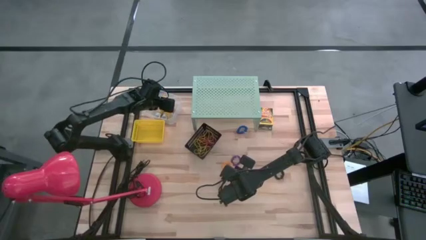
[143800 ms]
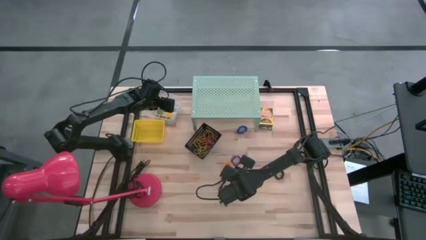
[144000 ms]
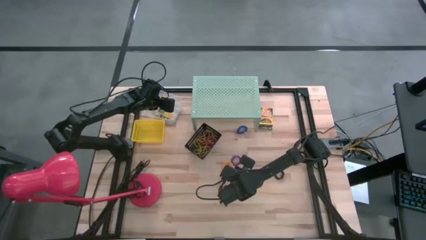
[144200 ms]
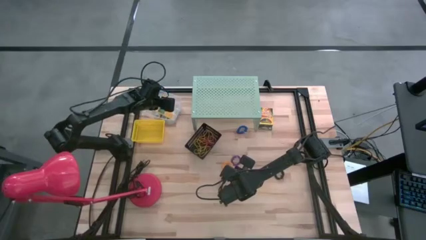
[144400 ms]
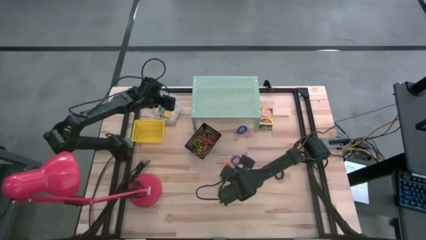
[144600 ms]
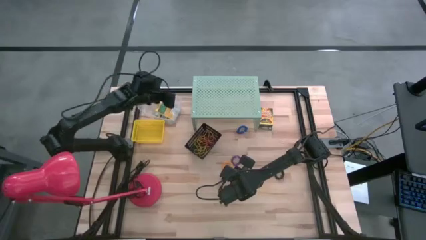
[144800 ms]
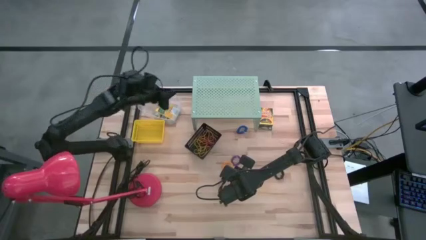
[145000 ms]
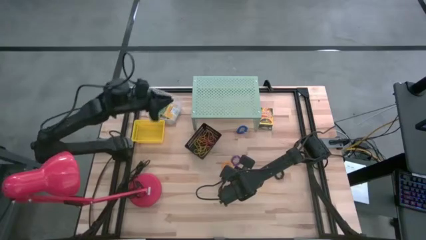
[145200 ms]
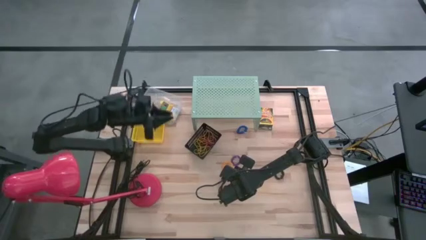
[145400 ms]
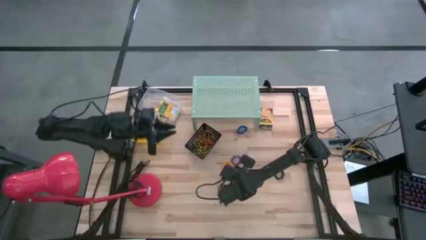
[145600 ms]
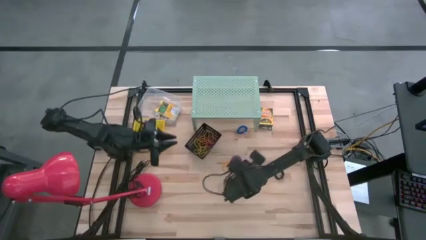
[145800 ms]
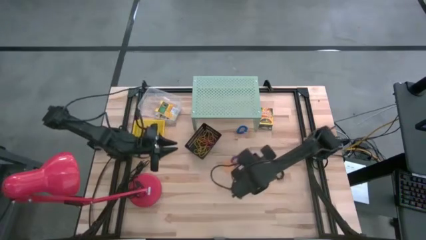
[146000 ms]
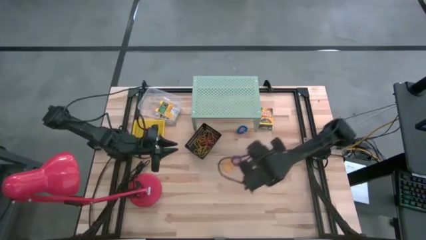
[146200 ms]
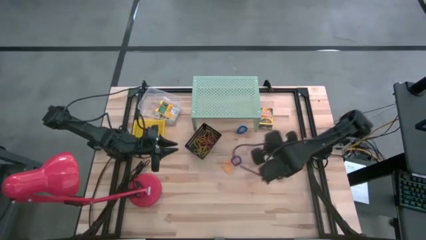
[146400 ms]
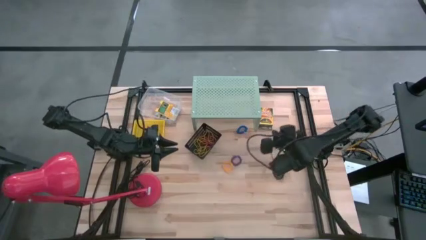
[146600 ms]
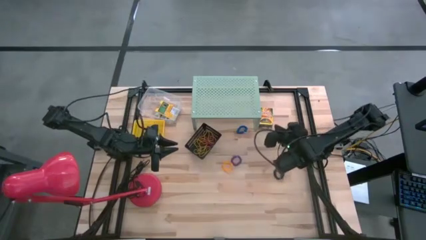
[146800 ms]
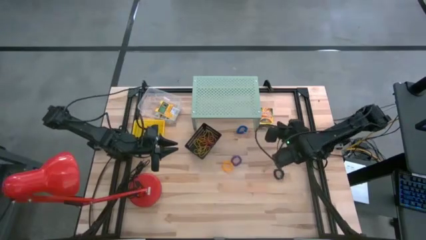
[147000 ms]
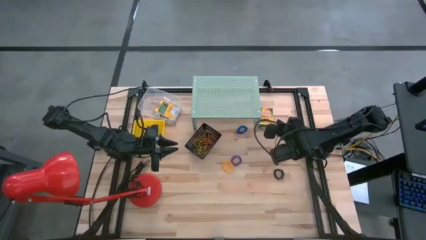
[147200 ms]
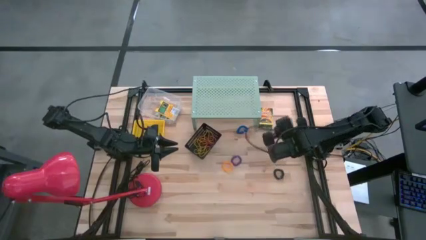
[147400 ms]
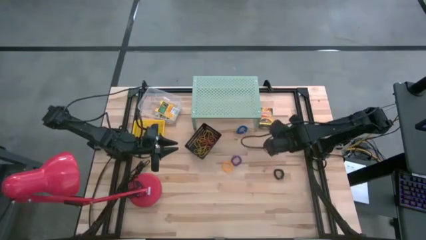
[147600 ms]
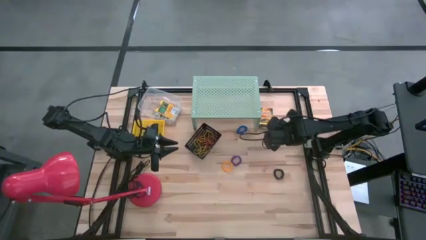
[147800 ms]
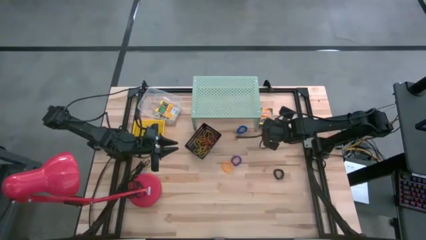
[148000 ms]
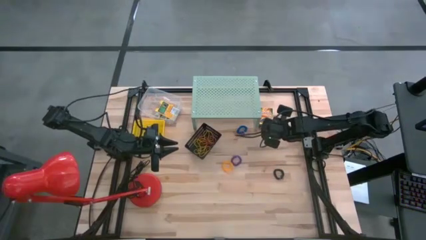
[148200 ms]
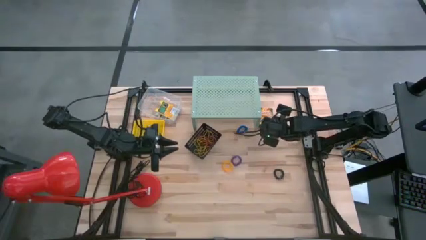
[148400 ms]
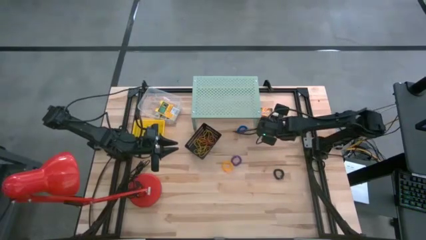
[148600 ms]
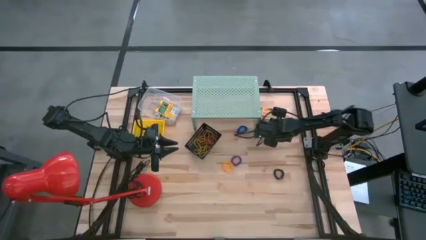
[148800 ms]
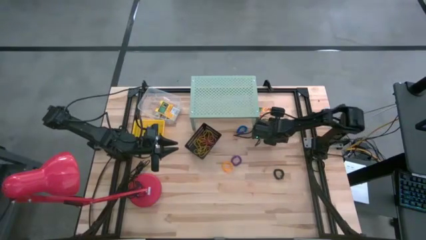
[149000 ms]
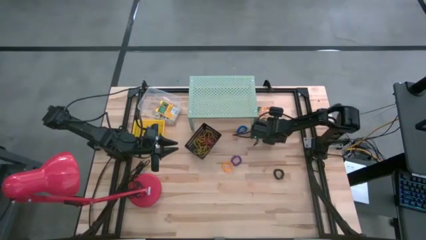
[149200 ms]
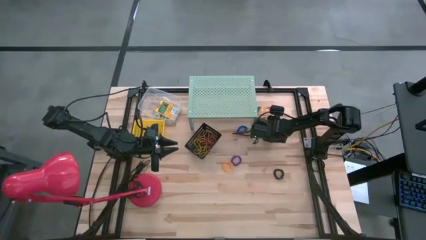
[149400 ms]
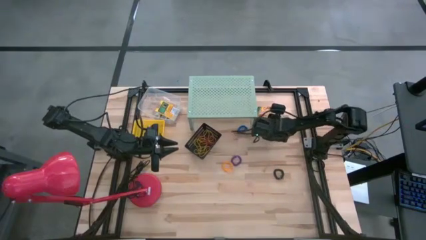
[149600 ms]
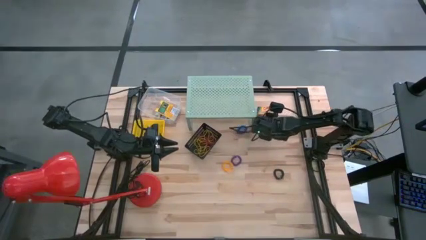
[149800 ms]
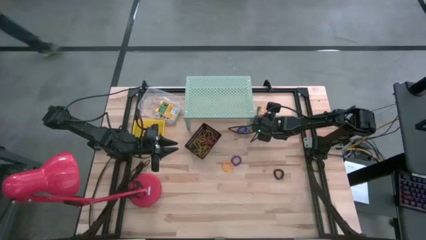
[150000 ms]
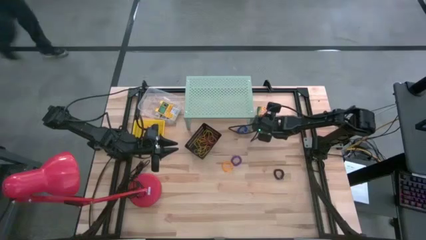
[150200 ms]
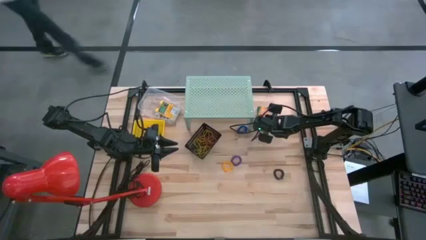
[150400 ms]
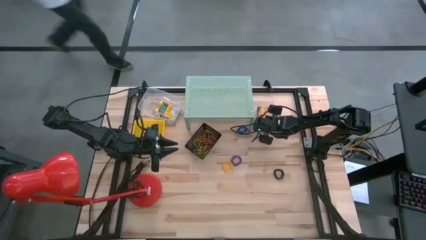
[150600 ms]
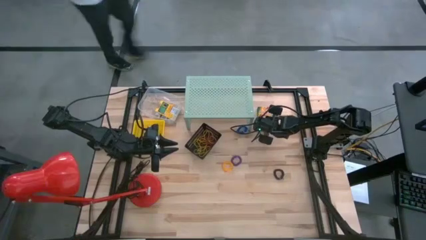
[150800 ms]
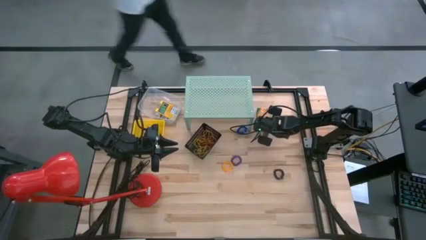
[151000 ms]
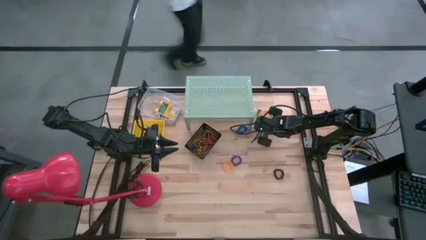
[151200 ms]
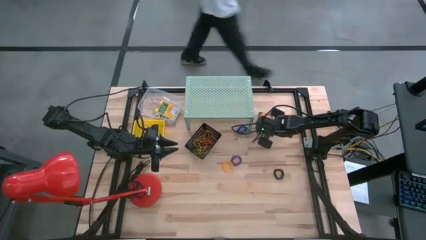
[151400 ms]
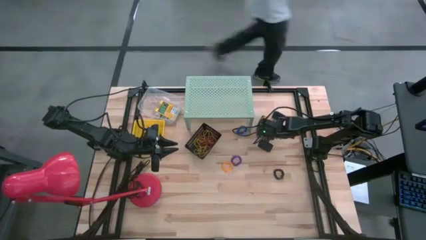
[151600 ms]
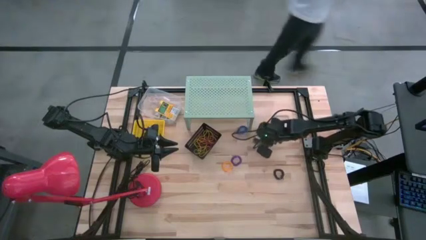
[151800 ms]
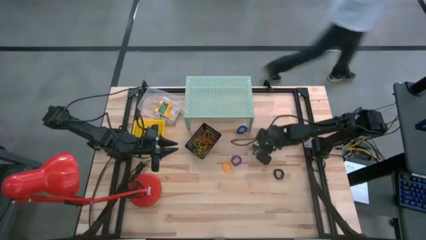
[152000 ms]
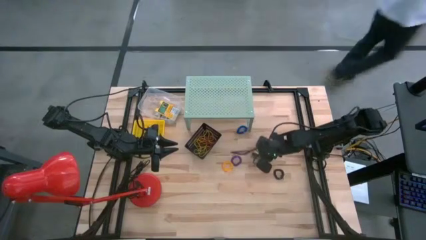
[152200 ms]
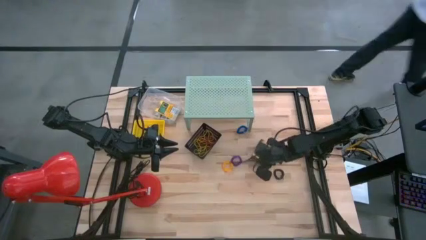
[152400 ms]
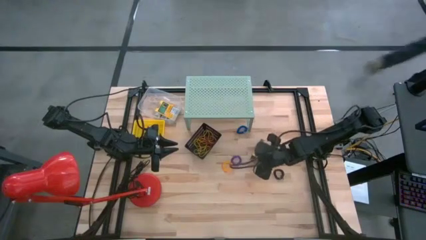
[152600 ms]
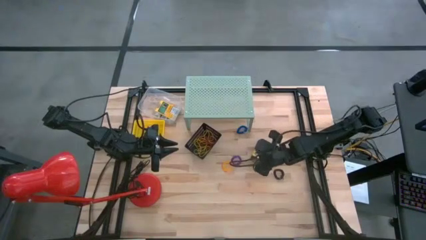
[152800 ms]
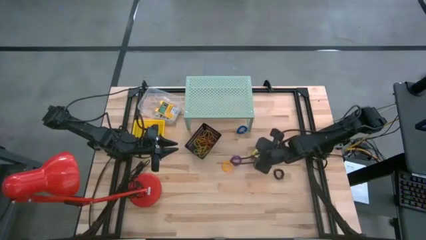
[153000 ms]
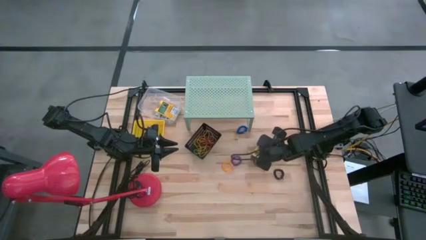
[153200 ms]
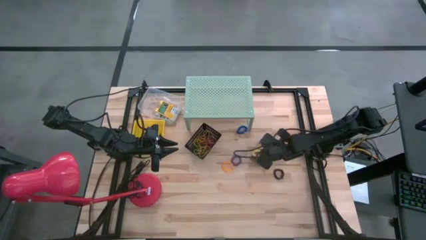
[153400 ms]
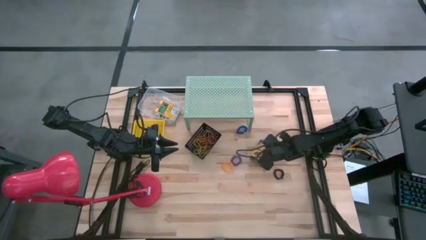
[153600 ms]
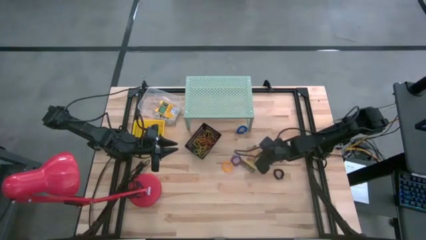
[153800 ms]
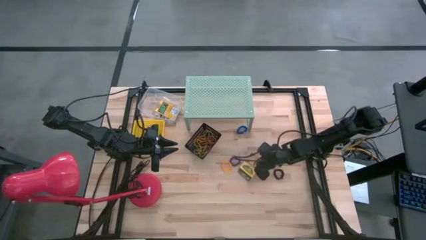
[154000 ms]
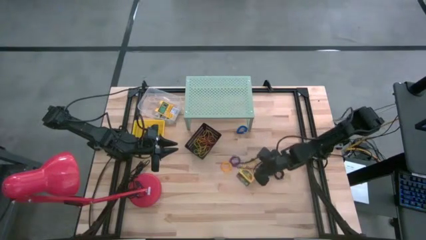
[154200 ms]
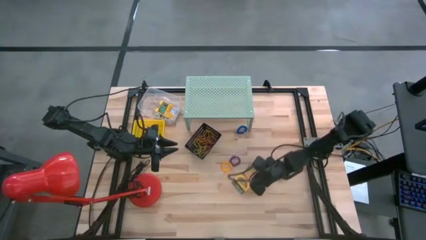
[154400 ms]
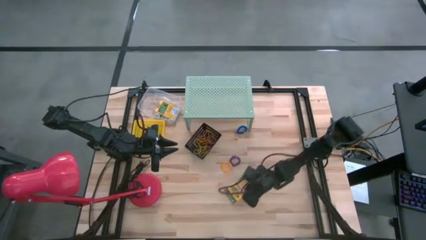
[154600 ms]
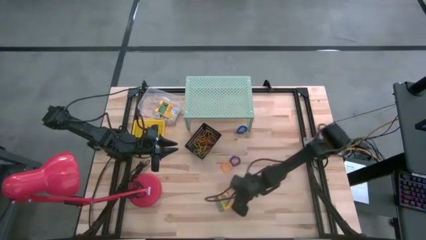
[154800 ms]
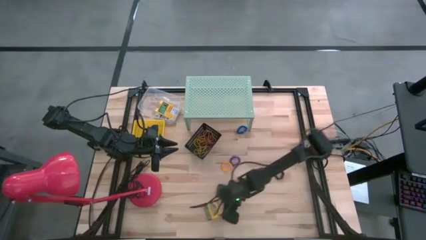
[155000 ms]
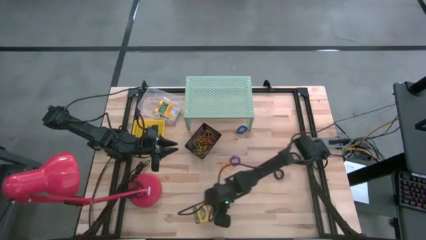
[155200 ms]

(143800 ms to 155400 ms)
Task: Pick & Place Office Desk Supplies
Put the big crayon box into the transparent bin
